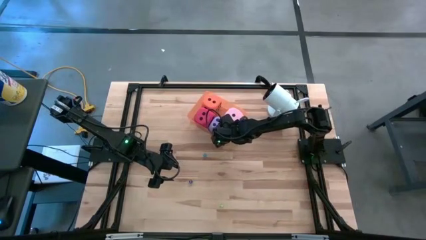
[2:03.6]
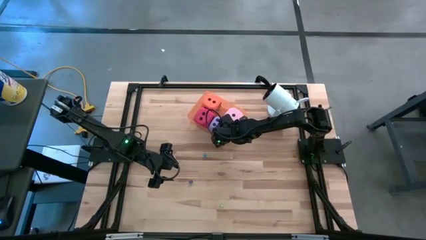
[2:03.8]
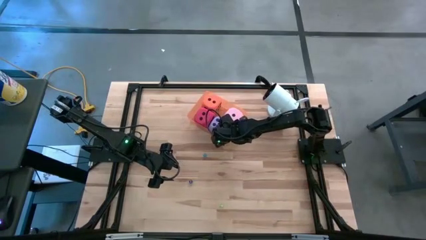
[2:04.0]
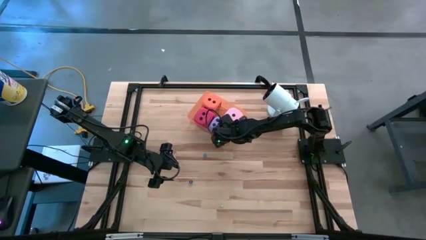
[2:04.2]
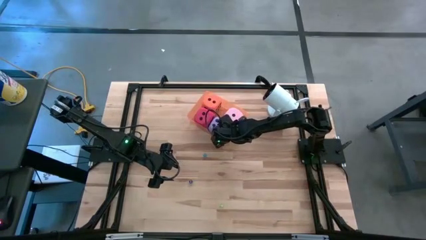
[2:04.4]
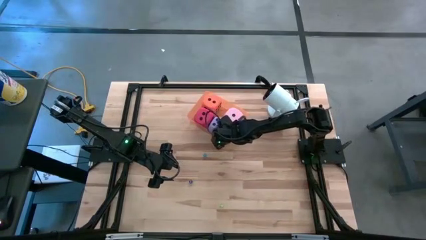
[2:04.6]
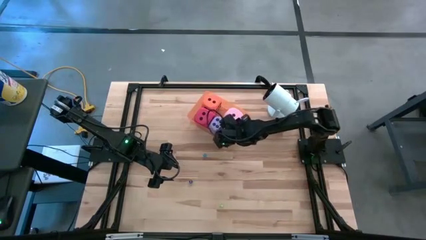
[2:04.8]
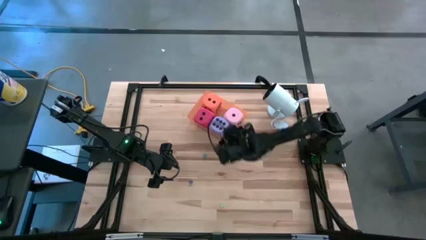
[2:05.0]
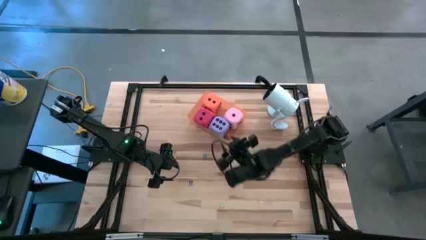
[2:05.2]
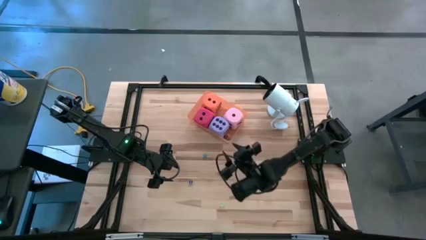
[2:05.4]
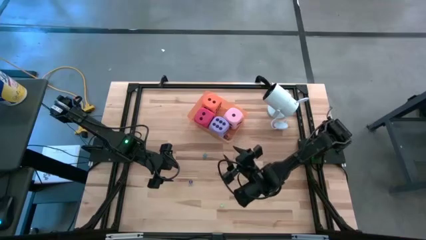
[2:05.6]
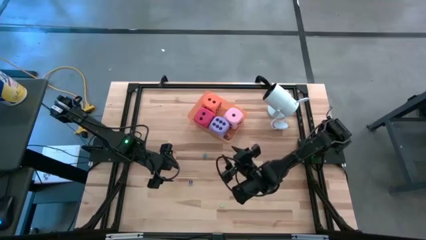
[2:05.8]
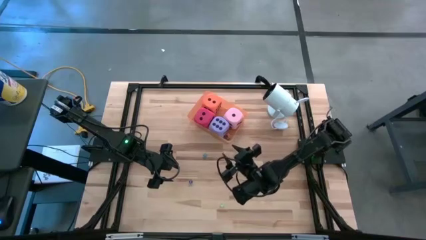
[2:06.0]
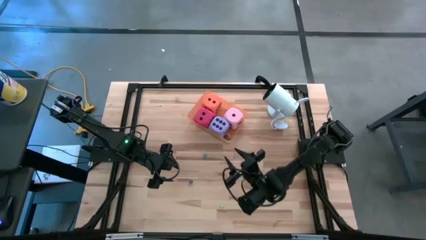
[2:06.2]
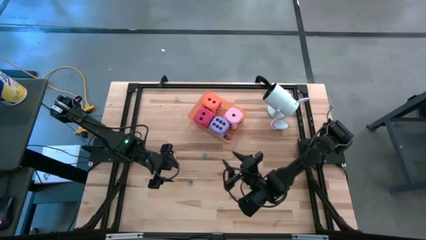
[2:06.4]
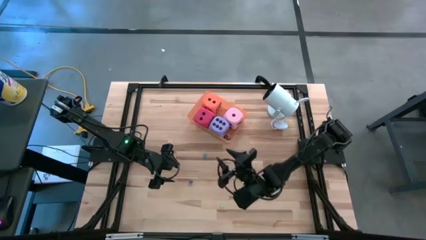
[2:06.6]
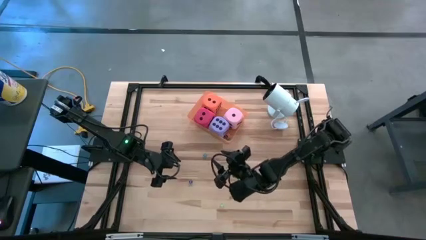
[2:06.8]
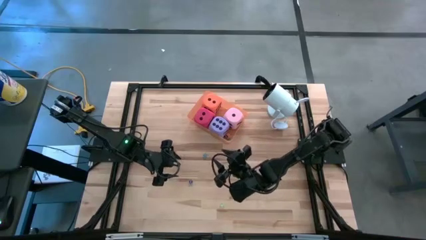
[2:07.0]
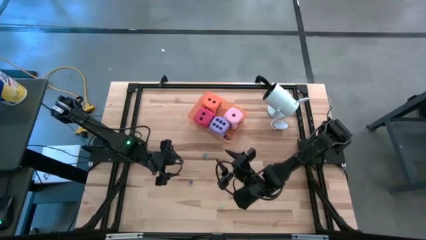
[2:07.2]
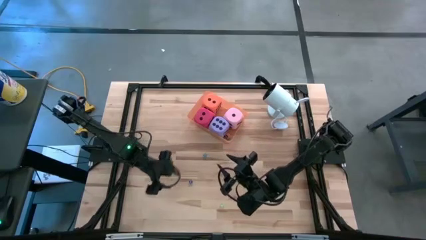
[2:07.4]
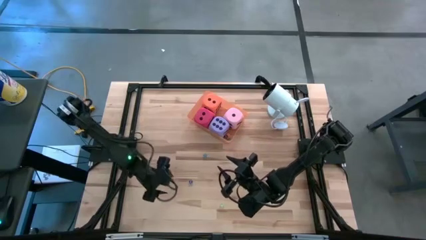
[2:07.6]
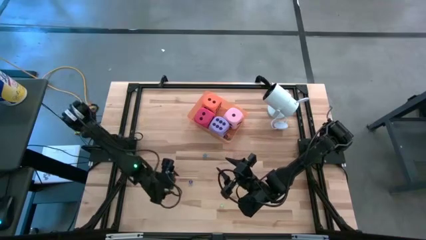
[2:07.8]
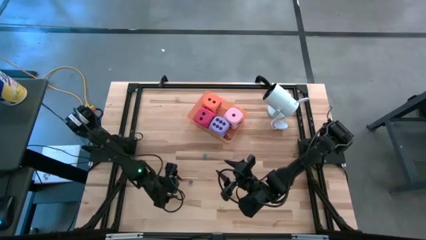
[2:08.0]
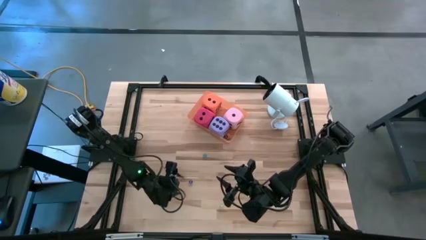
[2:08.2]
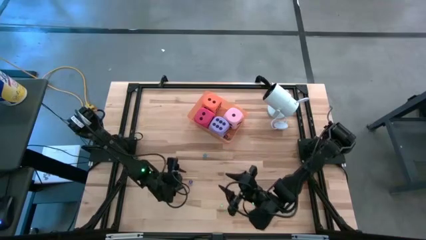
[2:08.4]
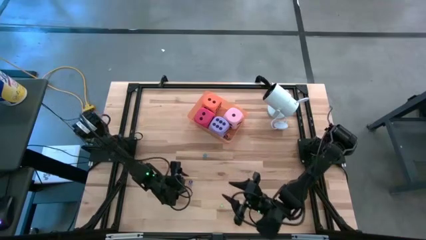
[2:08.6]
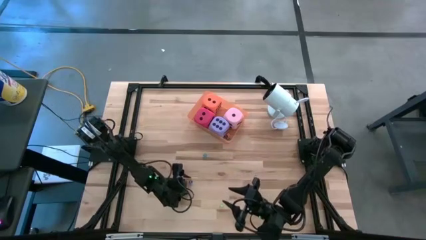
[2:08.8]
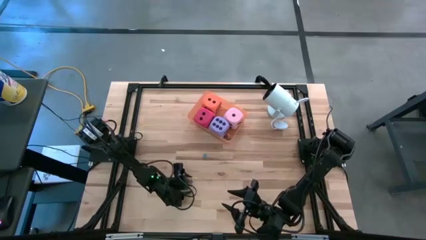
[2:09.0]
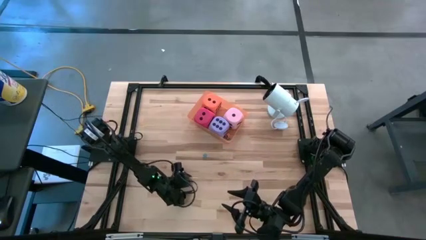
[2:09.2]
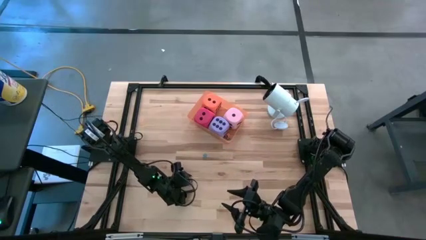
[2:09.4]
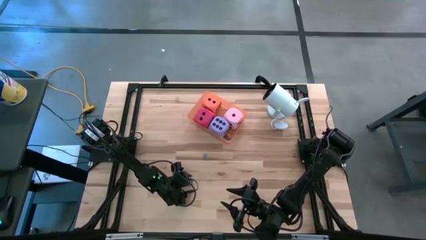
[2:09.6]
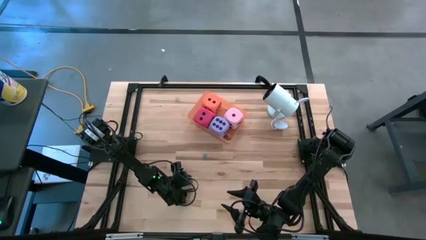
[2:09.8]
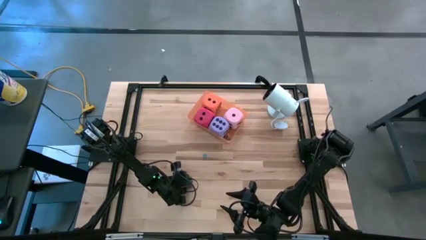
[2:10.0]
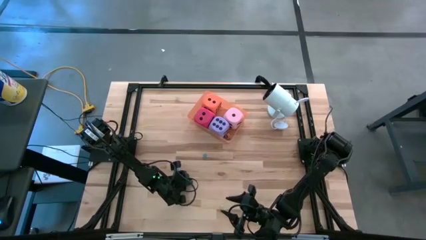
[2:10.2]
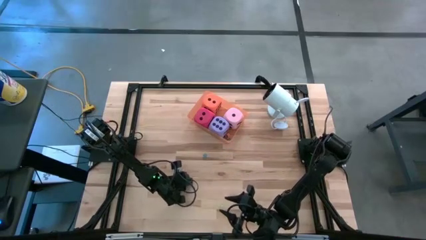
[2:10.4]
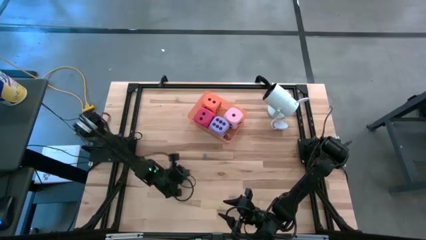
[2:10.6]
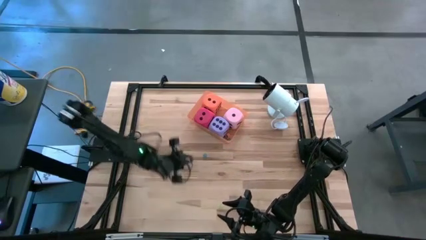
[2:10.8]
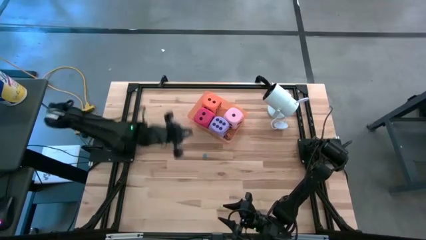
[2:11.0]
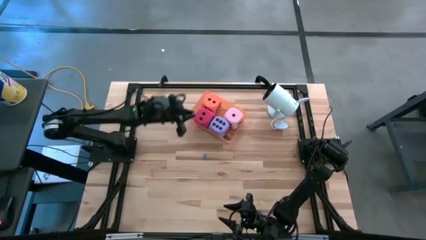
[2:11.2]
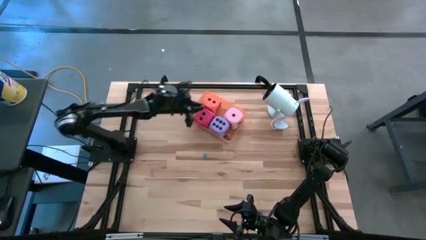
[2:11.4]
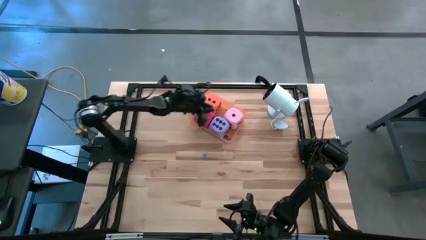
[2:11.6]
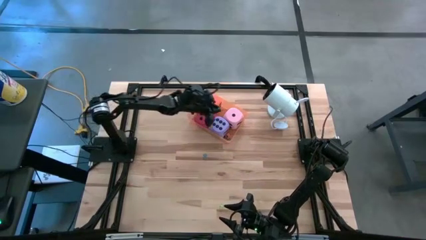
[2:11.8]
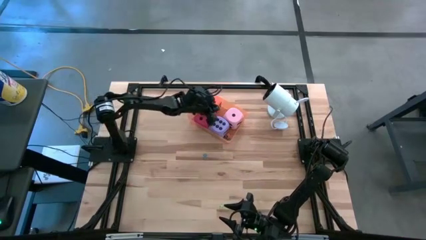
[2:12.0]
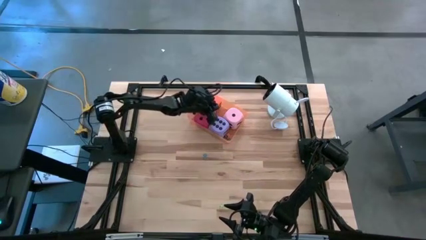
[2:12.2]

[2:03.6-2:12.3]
Task: Pick & Place Dice
Put the small dark blue die into the orange bin

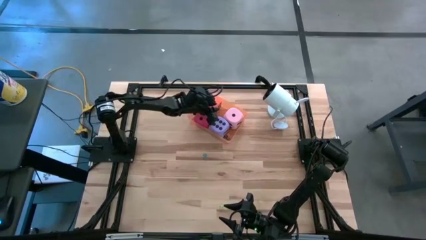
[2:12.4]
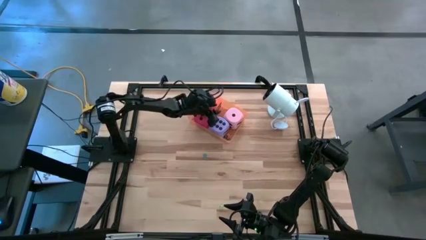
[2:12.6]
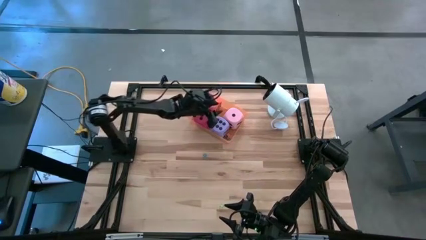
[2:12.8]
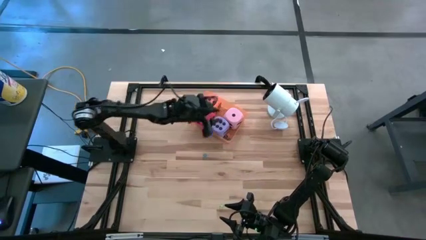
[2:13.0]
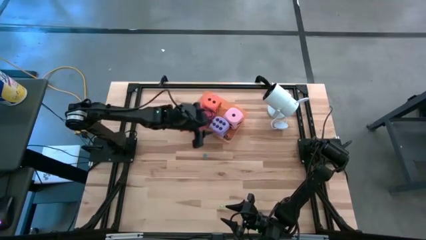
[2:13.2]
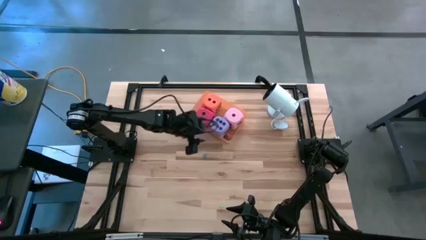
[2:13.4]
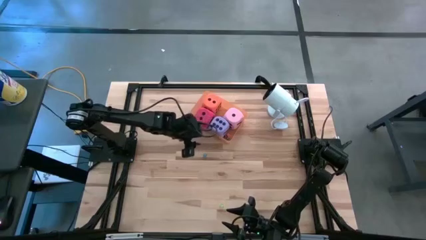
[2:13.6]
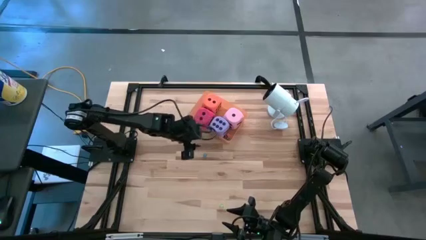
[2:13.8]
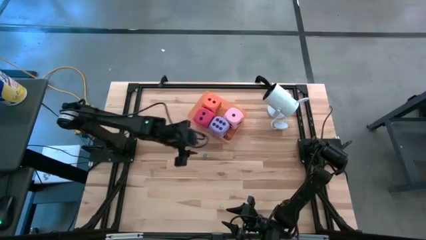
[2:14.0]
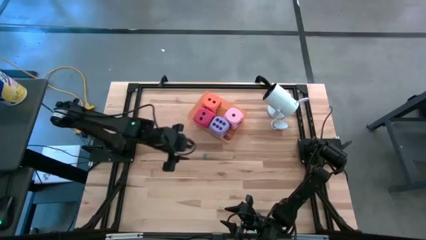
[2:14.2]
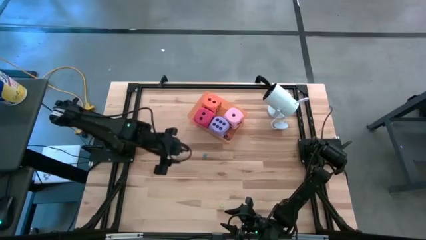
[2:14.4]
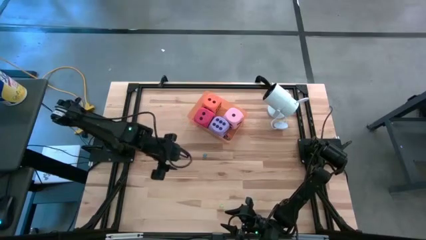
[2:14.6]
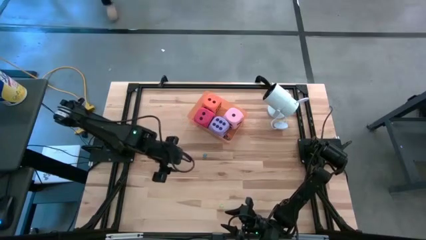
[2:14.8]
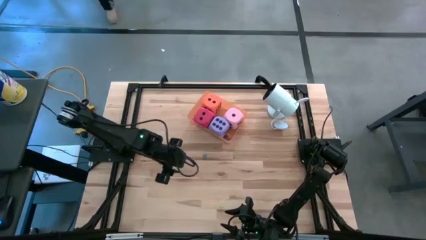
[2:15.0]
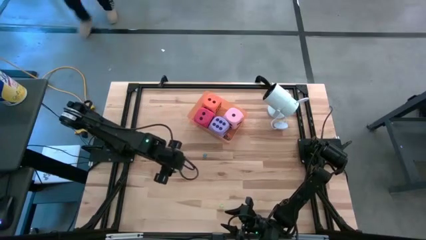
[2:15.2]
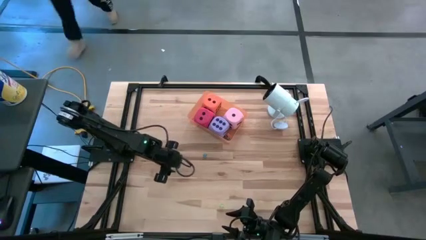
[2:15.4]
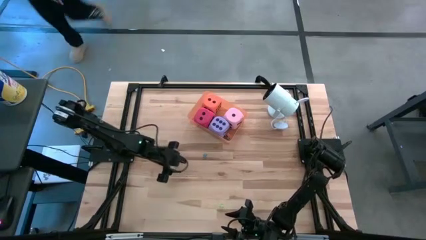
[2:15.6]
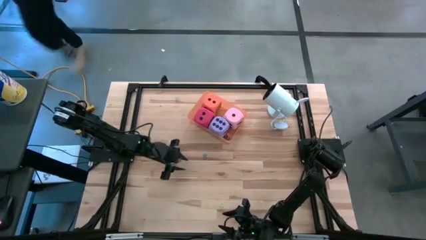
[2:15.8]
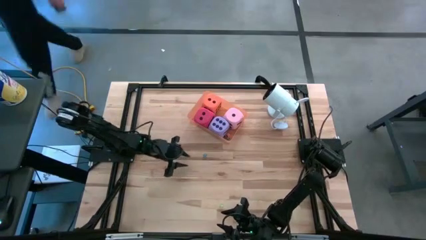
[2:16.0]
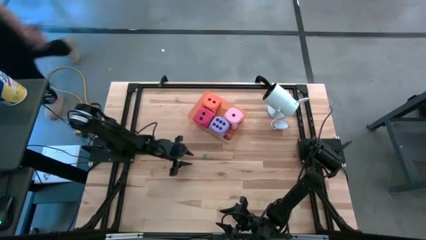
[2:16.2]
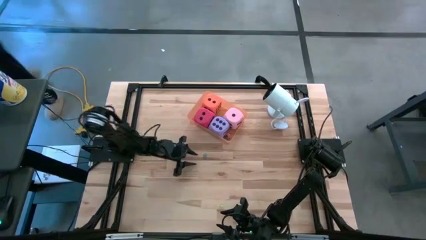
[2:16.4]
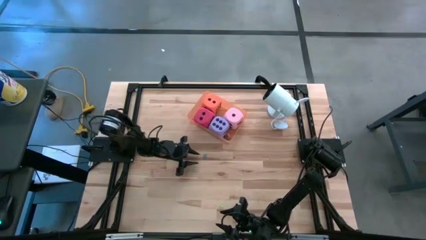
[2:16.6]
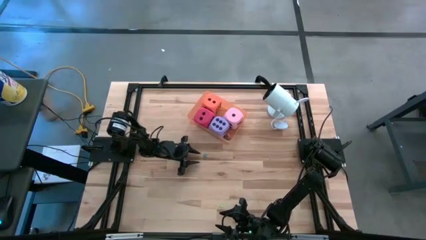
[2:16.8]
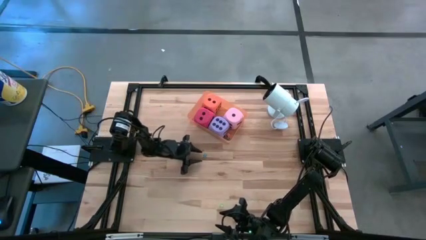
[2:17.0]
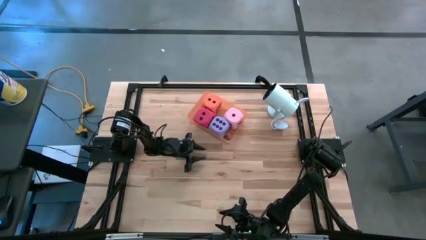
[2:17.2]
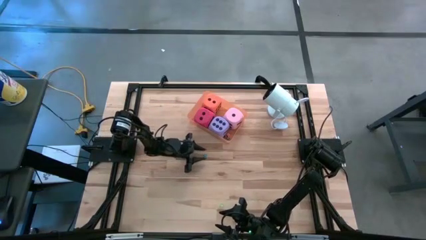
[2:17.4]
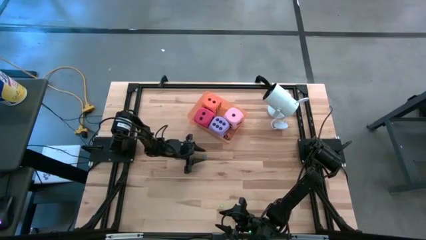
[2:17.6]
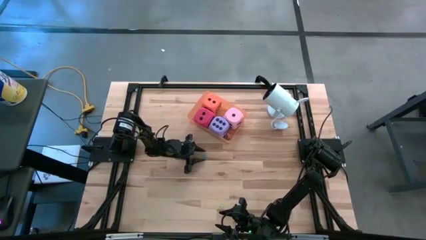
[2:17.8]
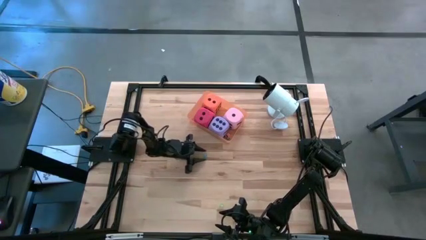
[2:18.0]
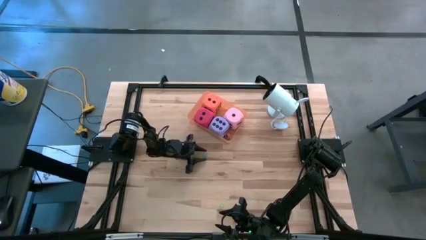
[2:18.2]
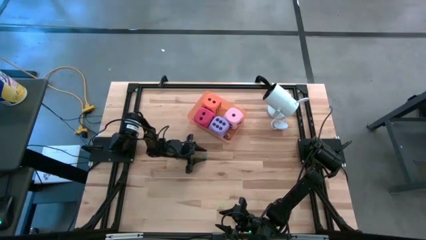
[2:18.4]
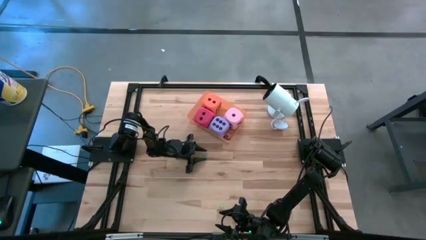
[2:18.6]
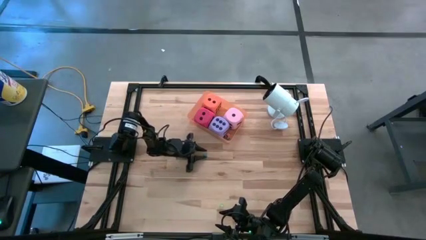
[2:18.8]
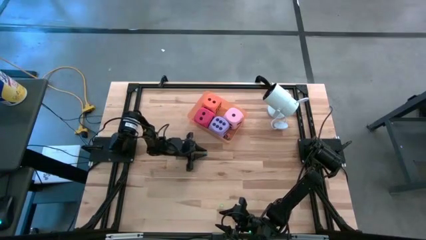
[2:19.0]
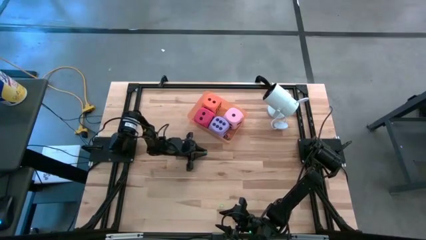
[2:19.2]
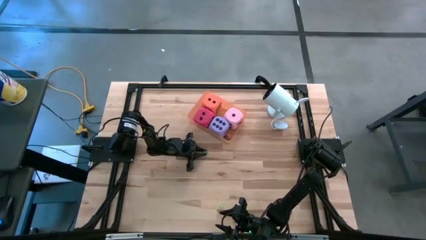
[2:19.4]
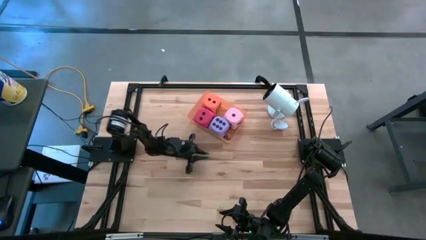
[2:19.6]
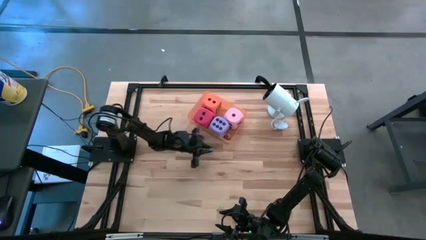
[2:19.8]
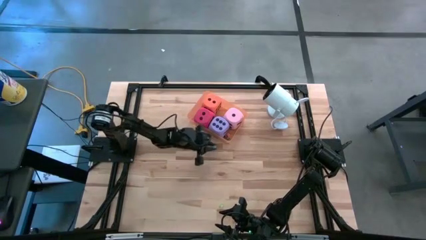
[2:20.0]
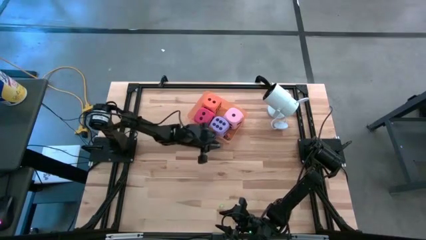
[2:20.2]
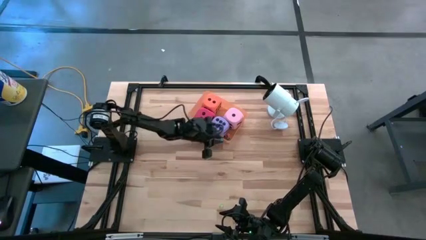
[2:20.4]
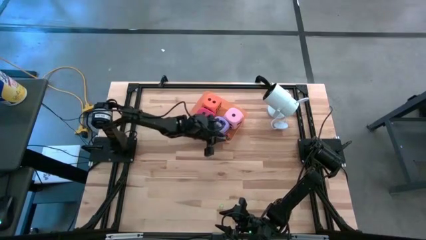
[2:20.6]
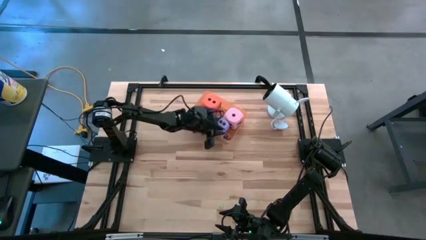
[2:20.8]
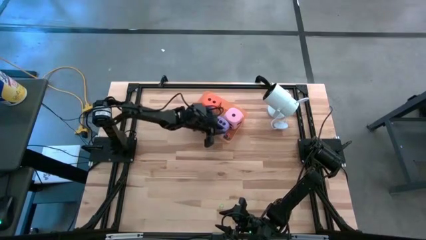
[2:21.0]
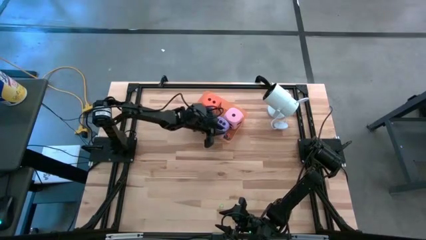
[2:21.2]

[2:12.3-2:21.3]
Put the small blue die into the orange bin
